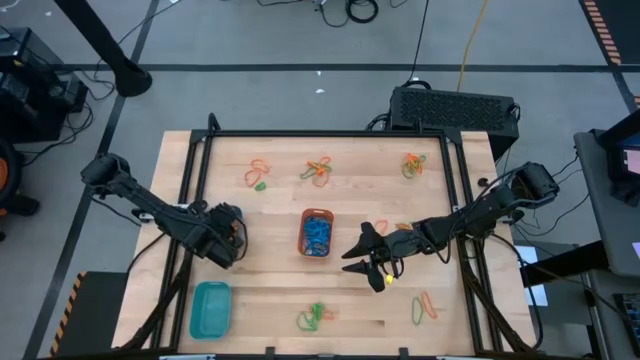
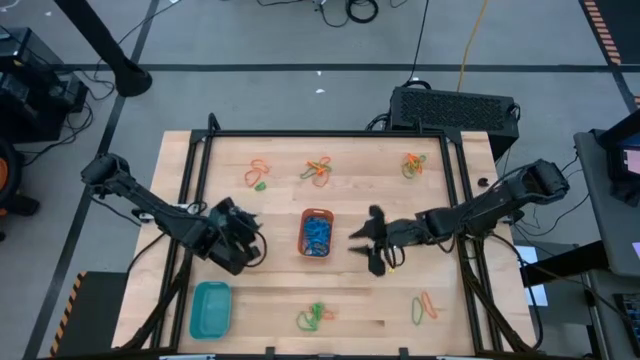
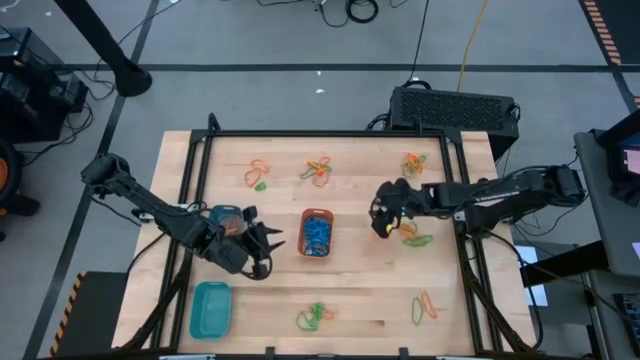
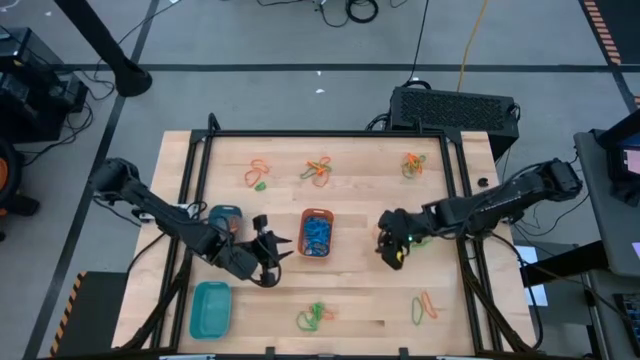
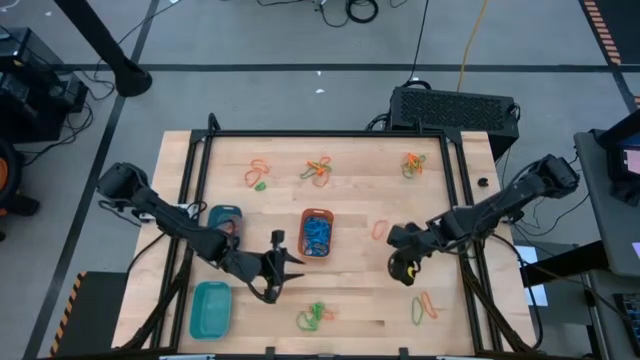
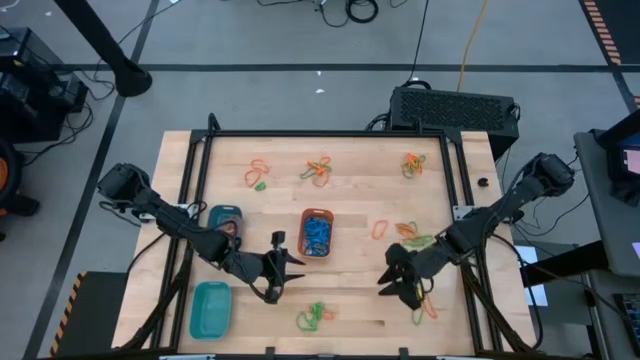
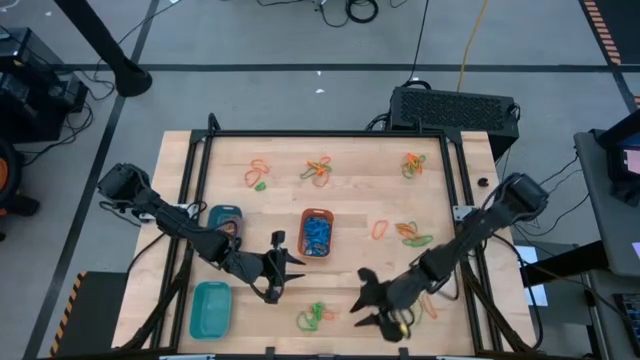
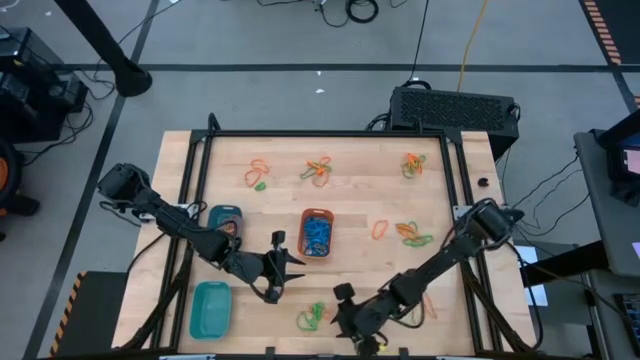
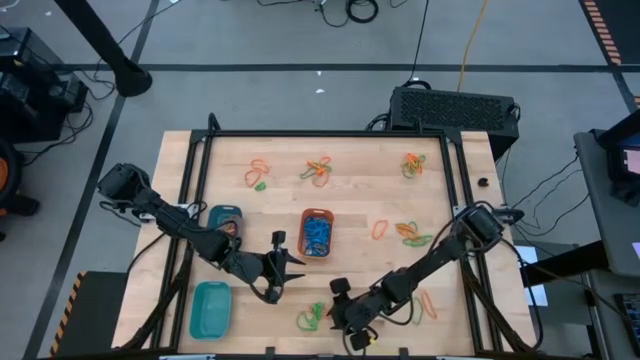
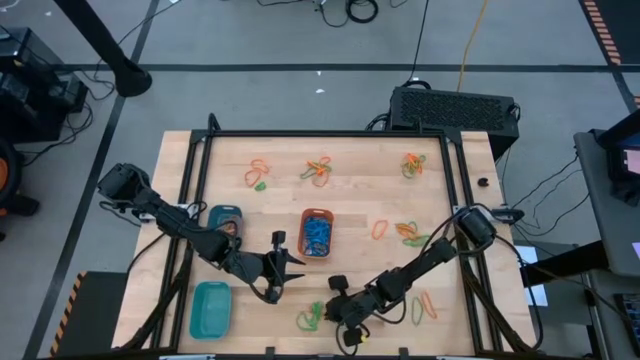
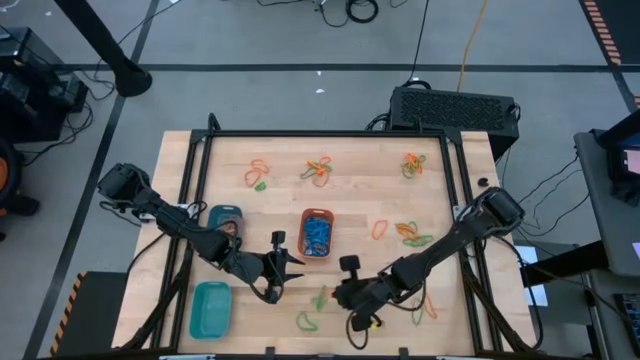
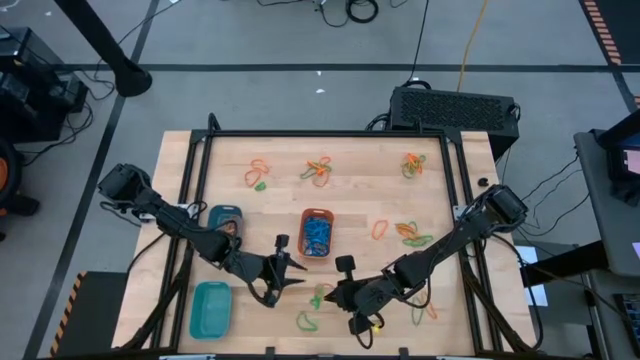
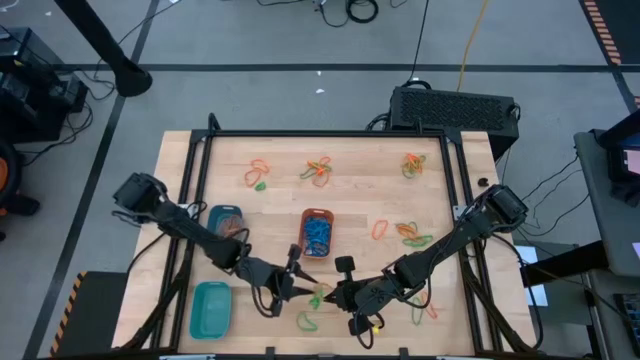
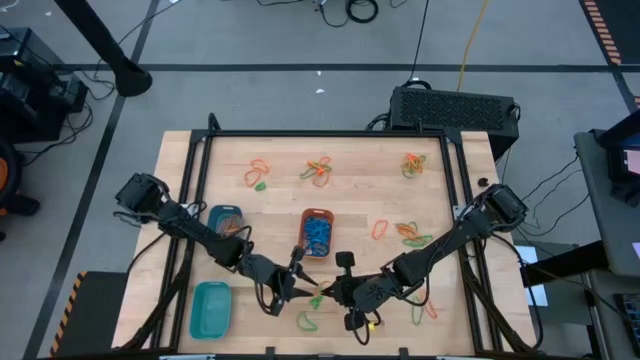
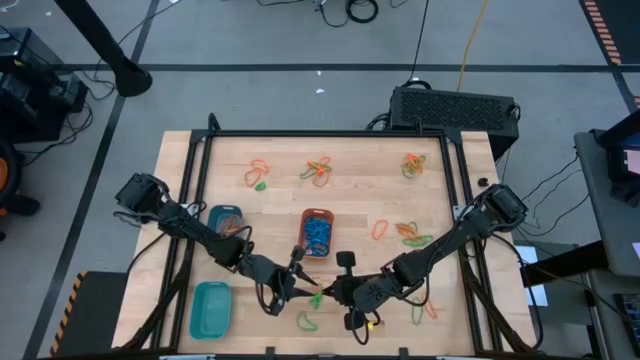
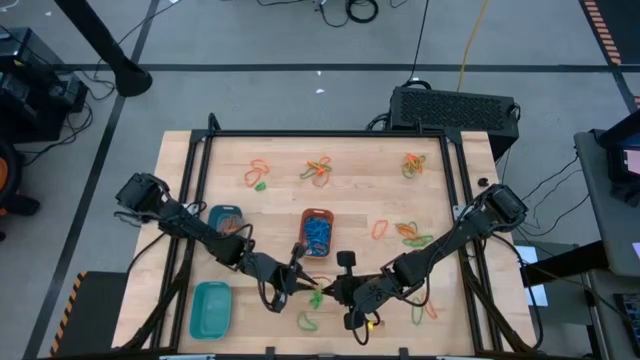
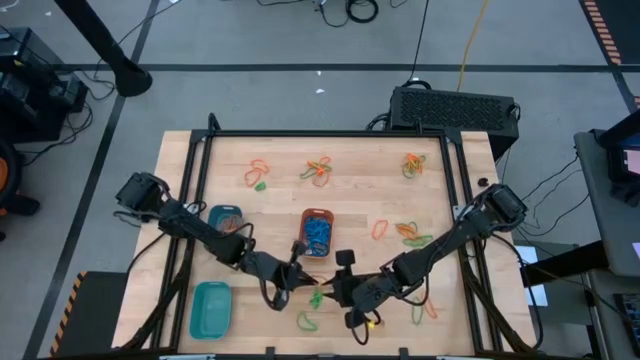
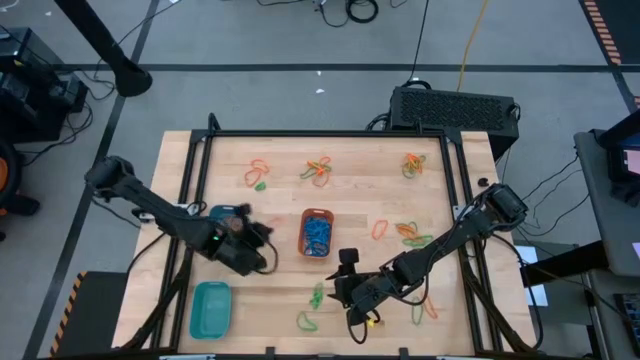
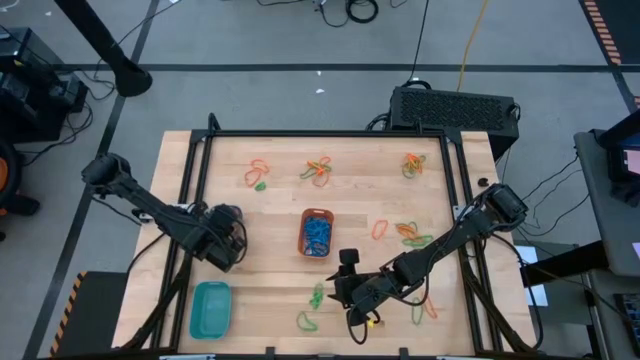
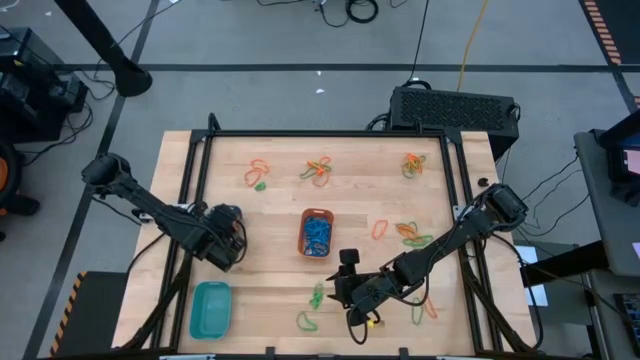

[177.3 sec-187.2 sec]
Task: Sort rubber bands into baskets
Put the orange rubber band into the blue bin

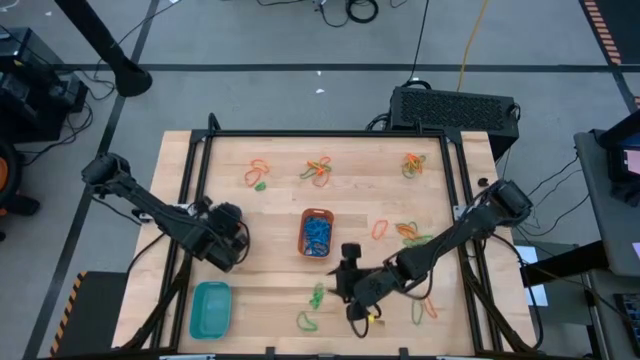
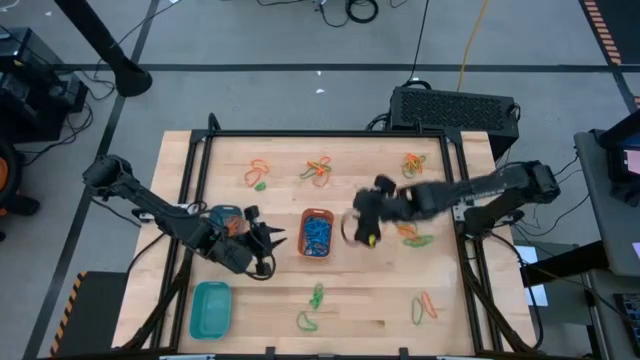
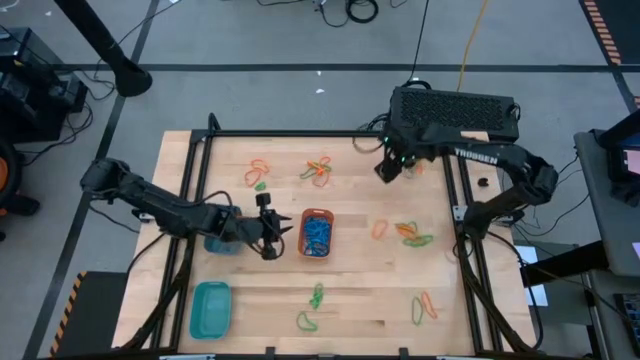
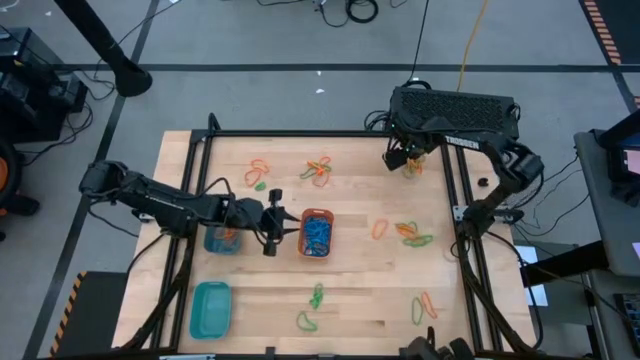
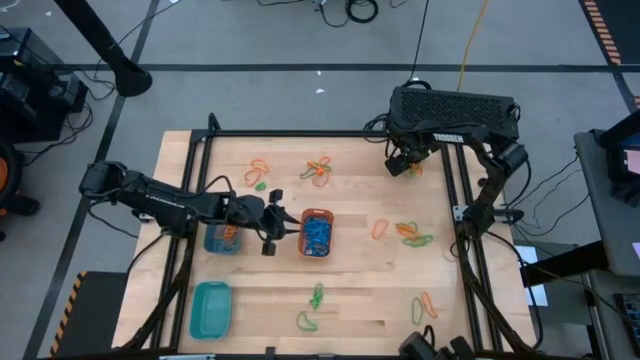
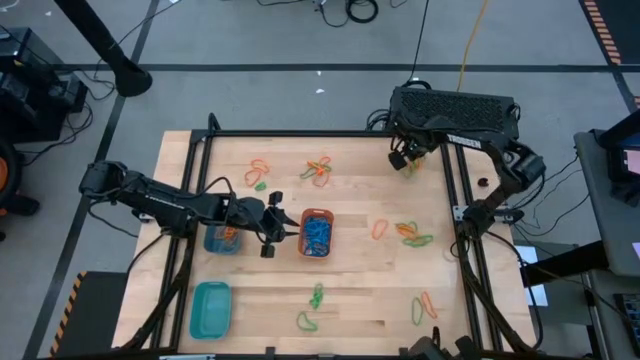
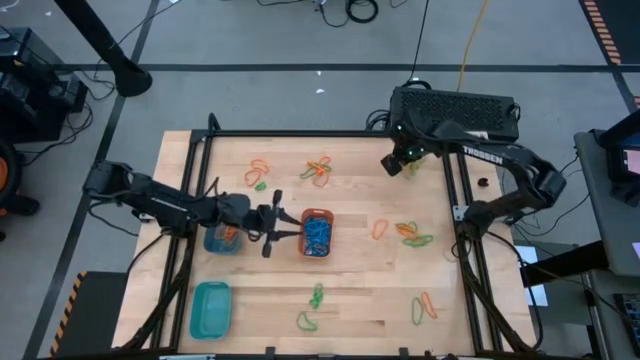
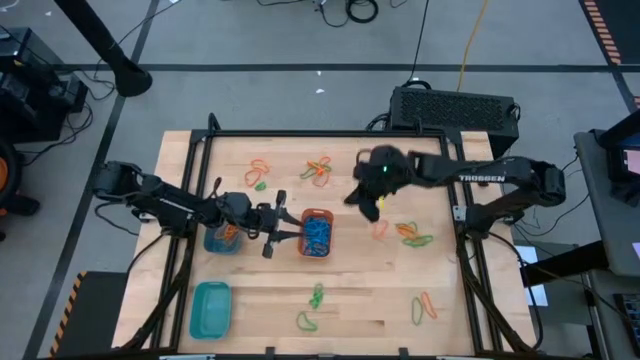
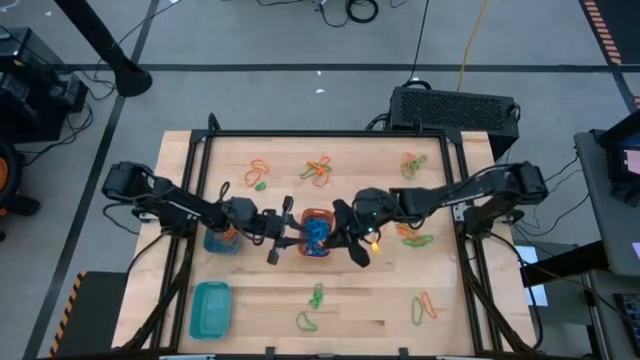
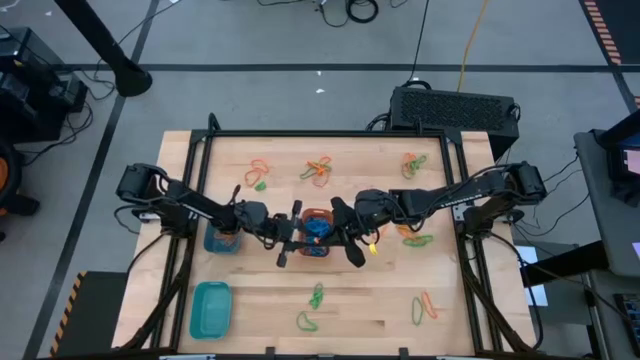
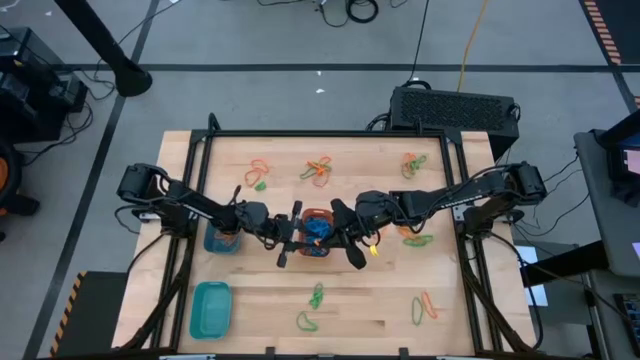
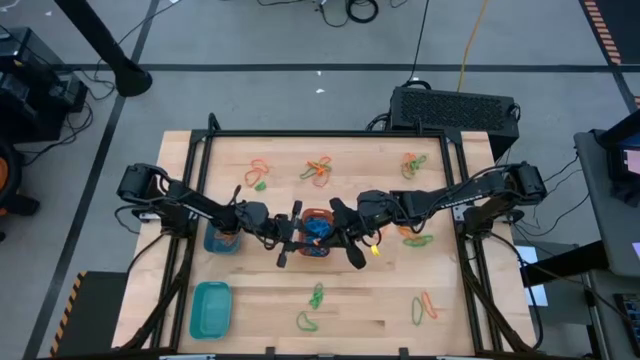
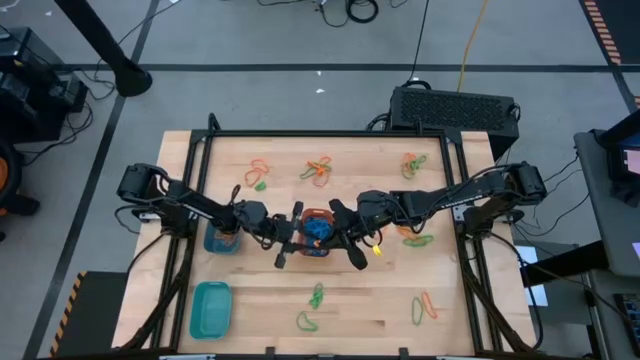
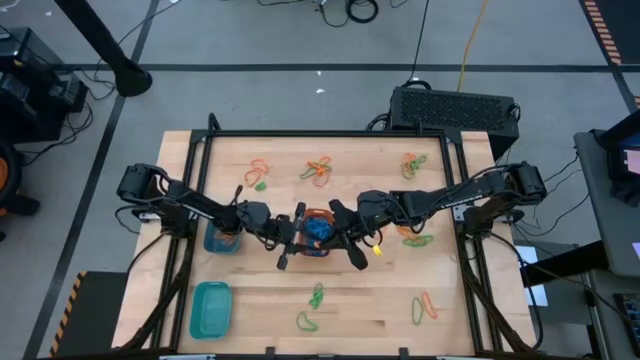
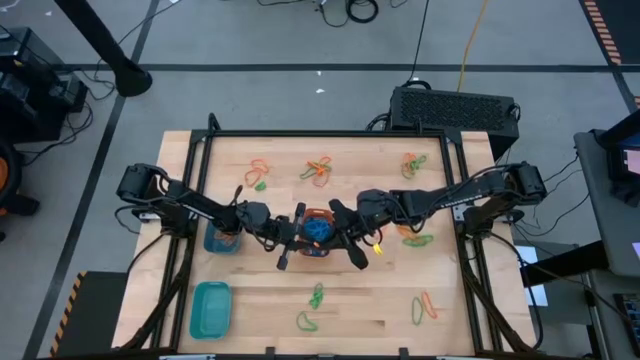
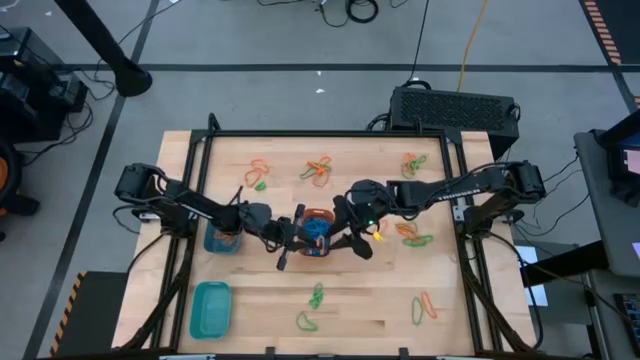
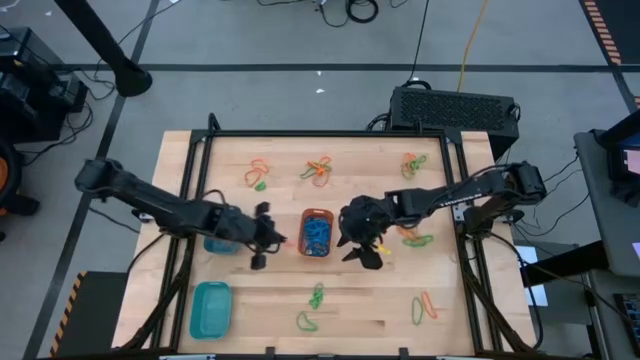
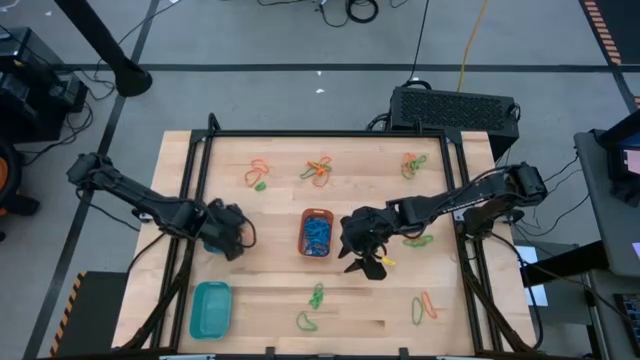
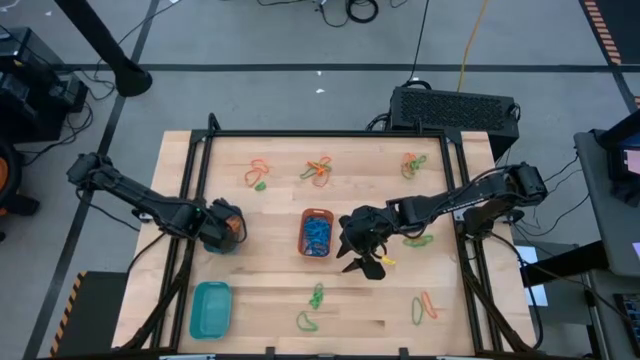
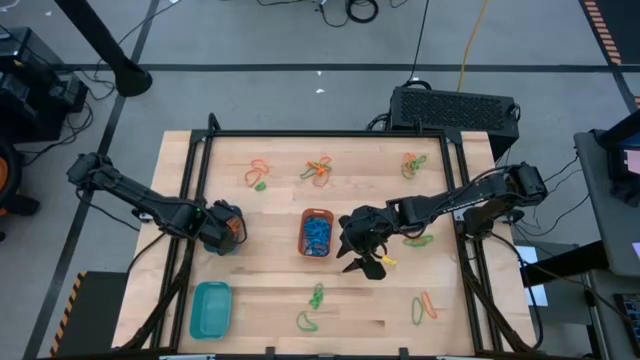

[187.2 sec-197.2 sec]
Put the orange rubber band into the blue bin

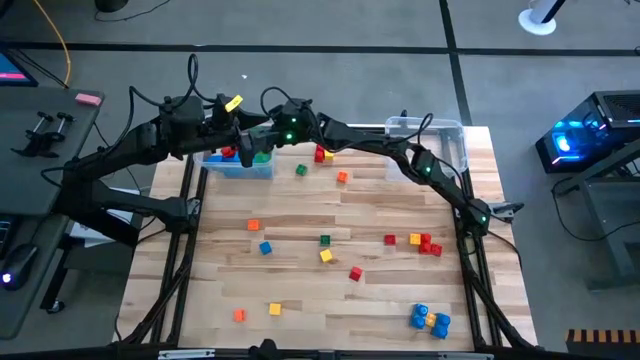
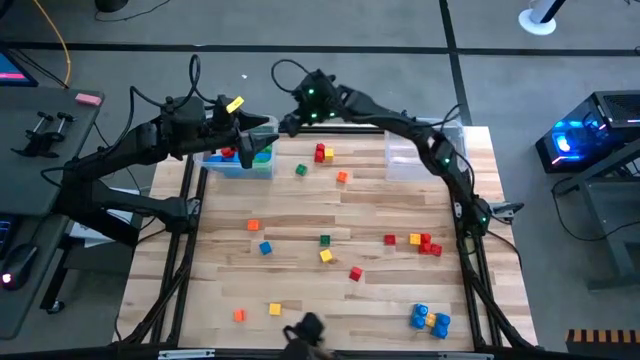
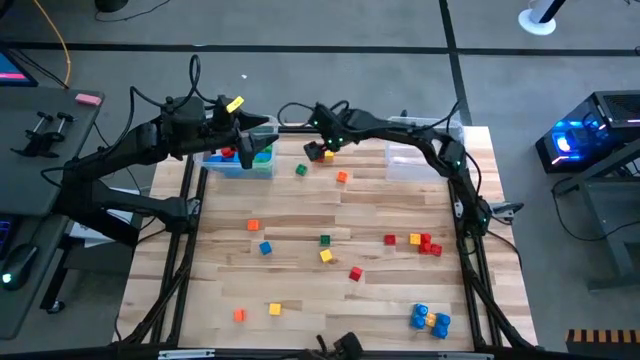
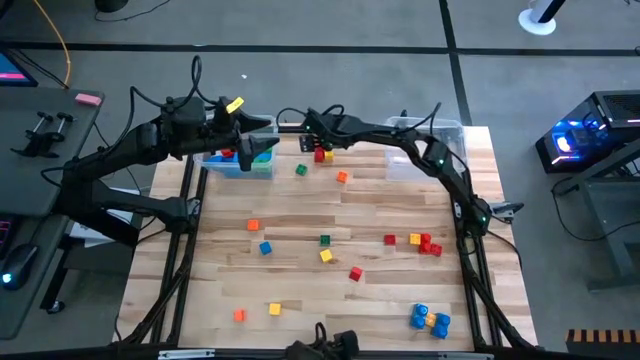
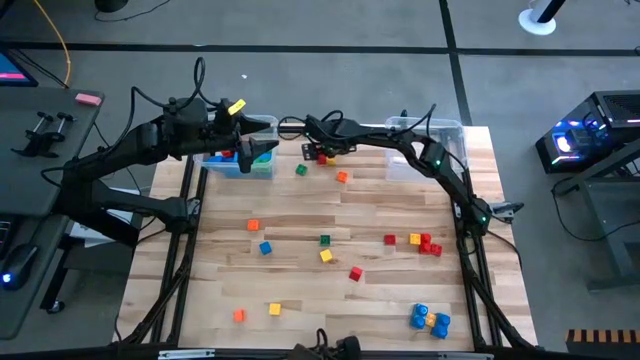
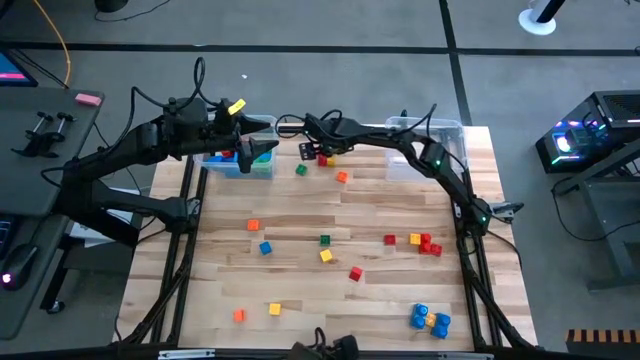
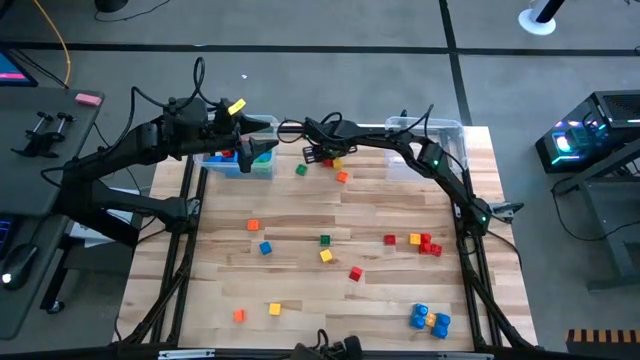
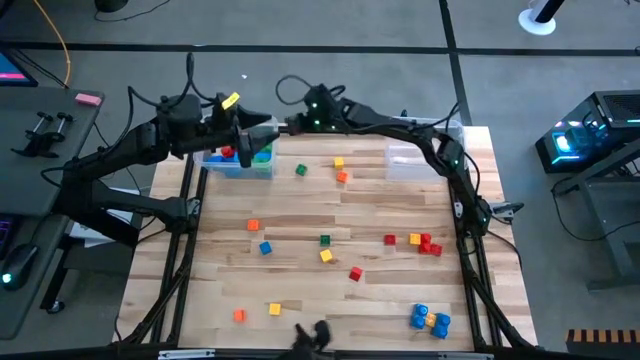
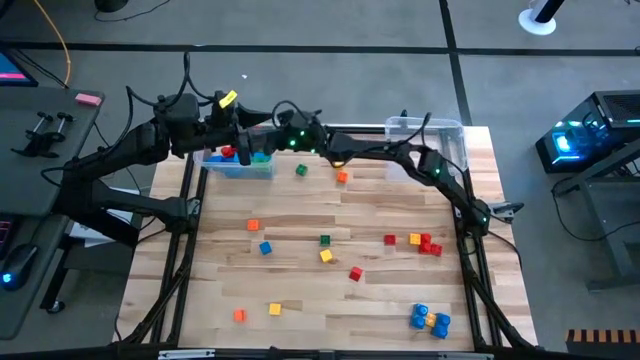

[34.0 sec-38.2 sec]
Task: Sort blocks by size
Put the large game piece into the left transparent bin
